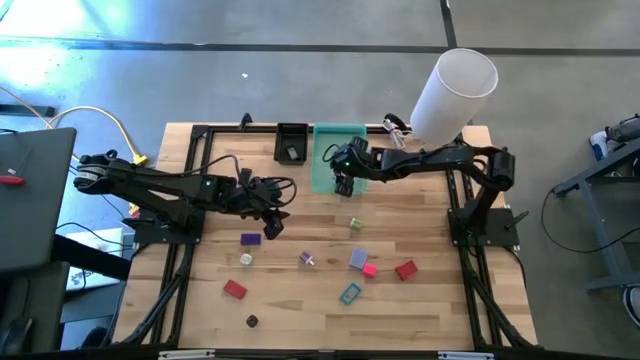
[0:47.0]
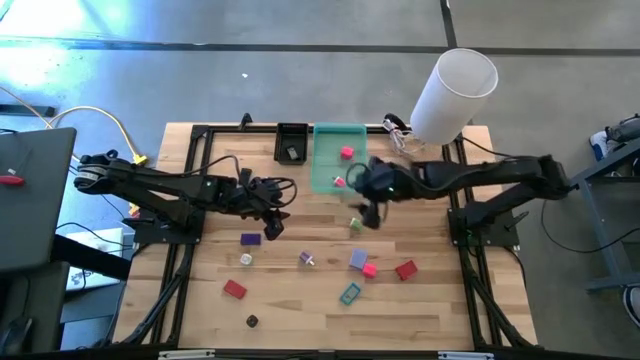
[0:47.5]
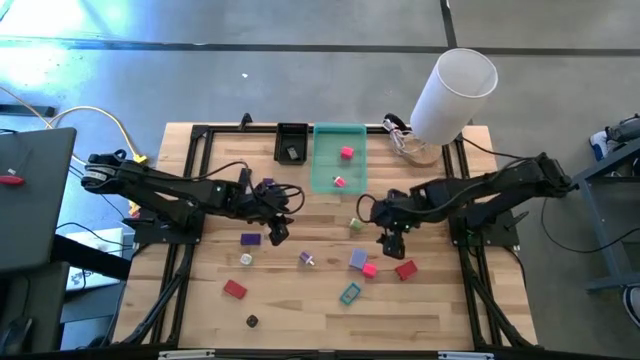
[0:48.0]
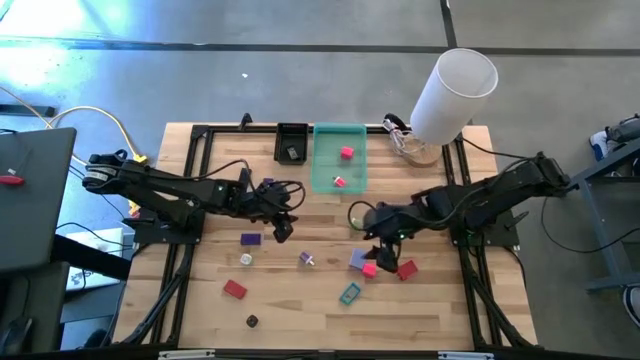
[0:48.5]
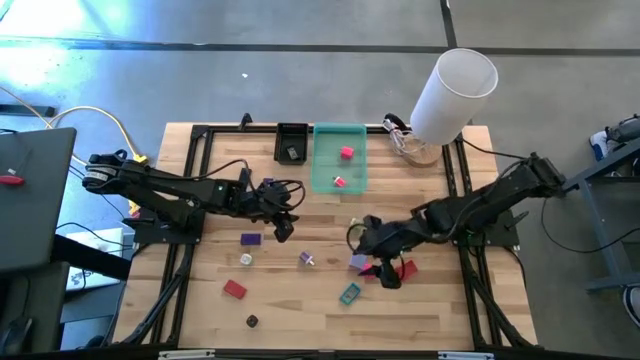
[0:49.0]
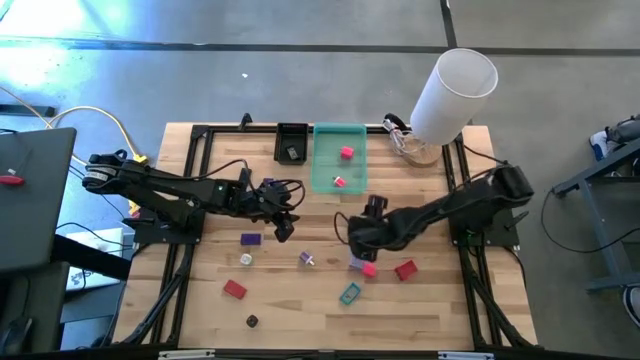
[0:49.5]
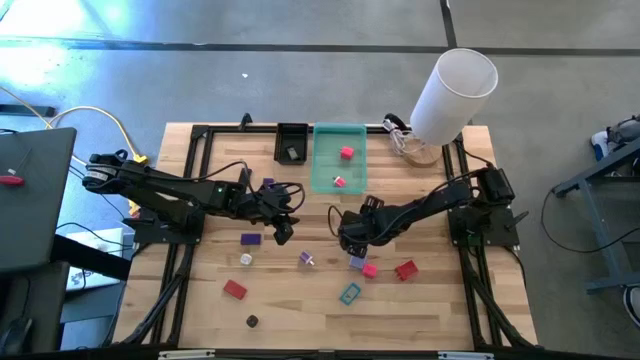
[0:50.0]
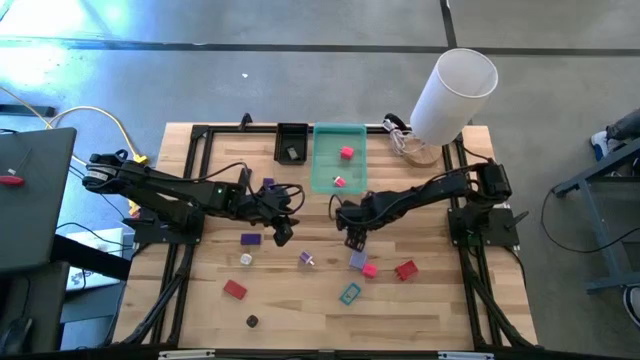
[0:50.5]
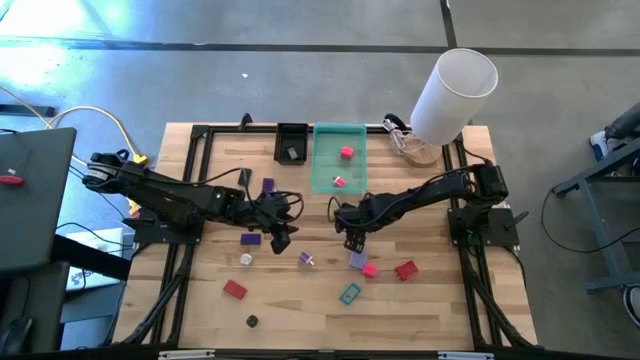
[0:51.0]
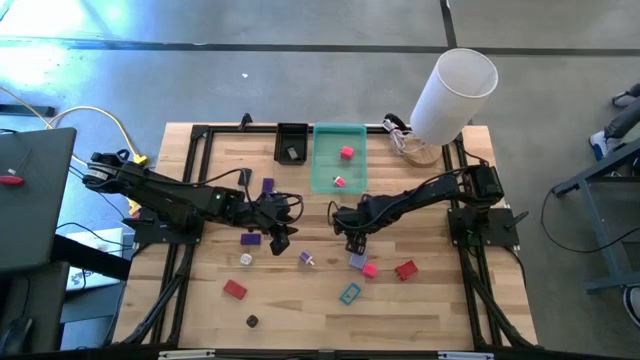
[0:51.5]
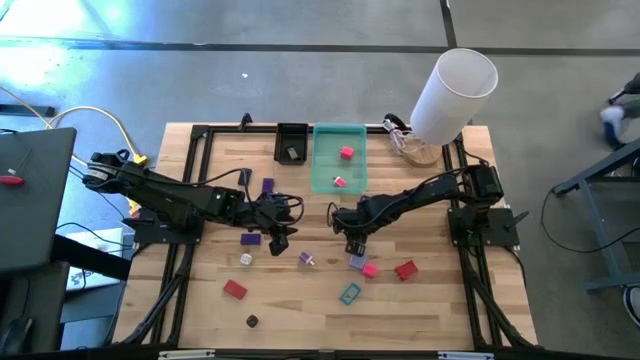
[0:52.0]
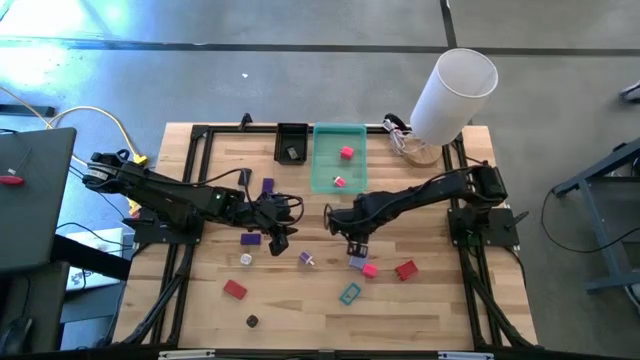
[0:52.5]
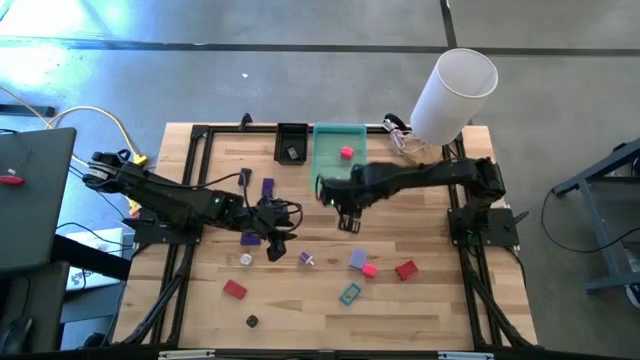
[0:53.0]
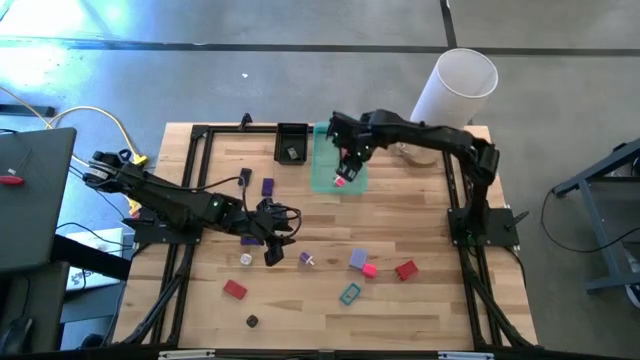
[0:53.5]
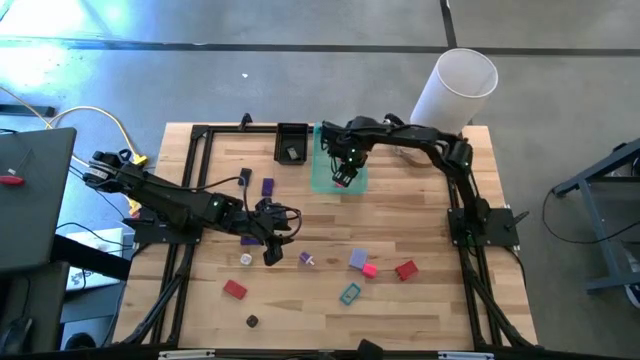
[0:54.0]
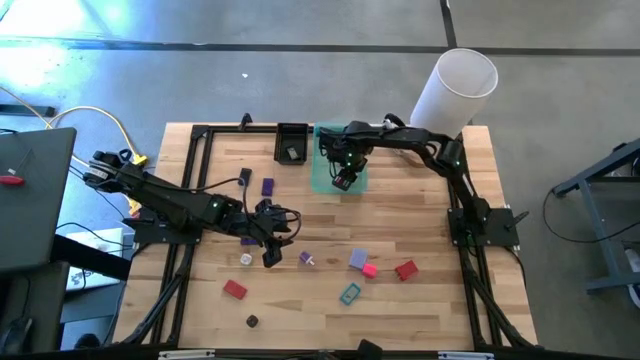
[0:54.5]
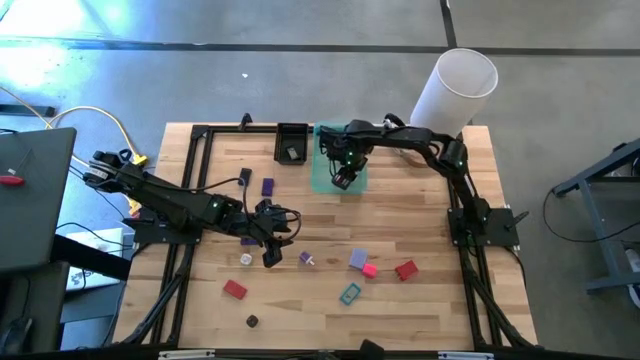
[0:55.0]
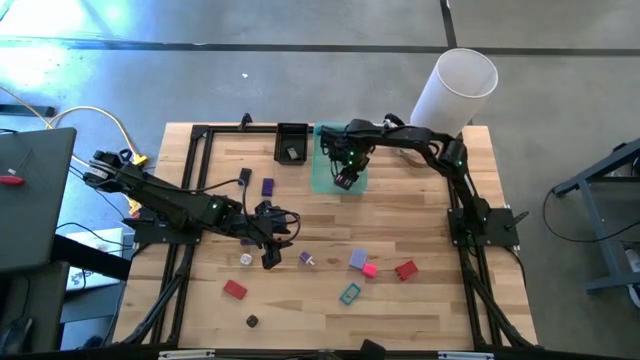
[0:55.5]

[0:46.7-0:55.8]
Task: Pick & Place Office items
Put the right green charger adapter into the green bin

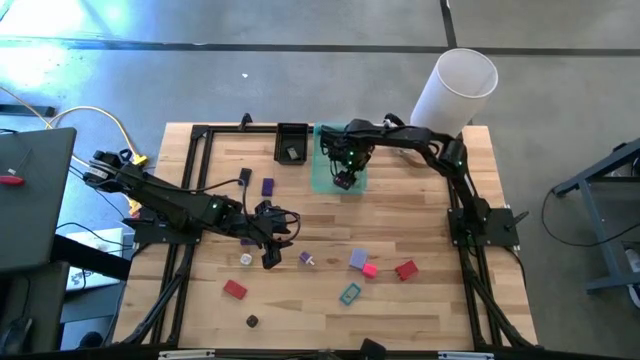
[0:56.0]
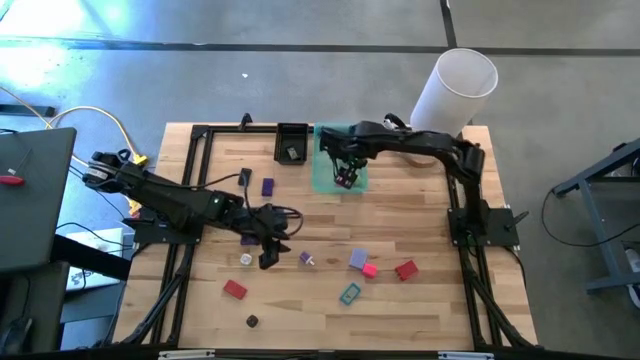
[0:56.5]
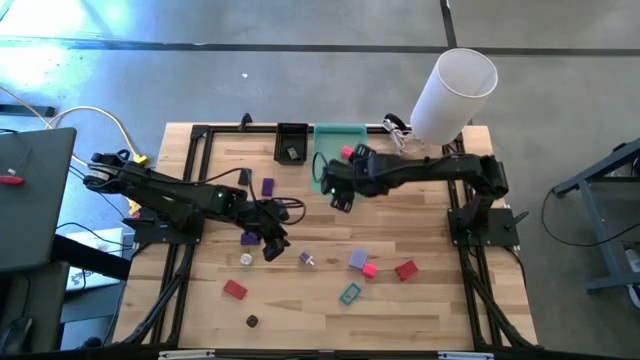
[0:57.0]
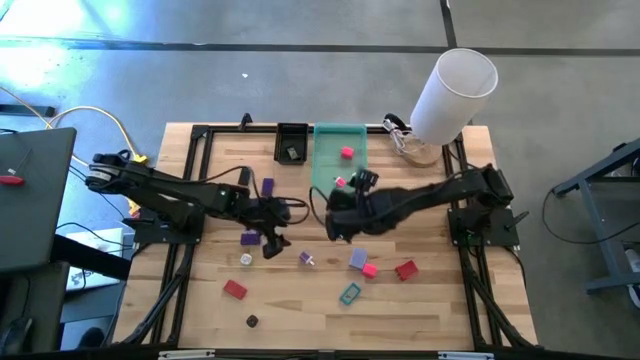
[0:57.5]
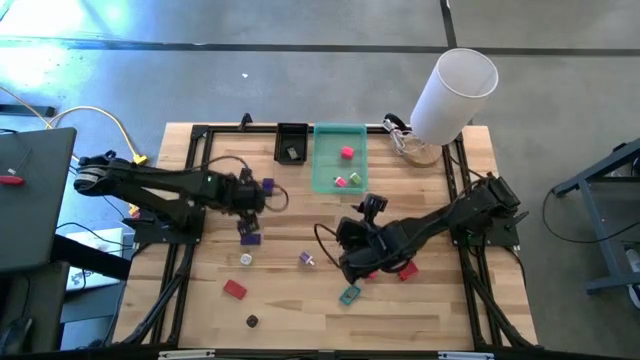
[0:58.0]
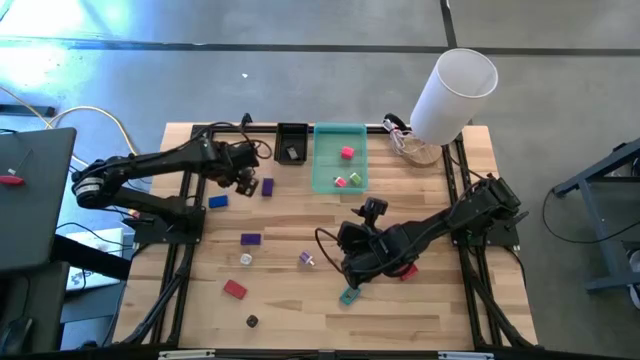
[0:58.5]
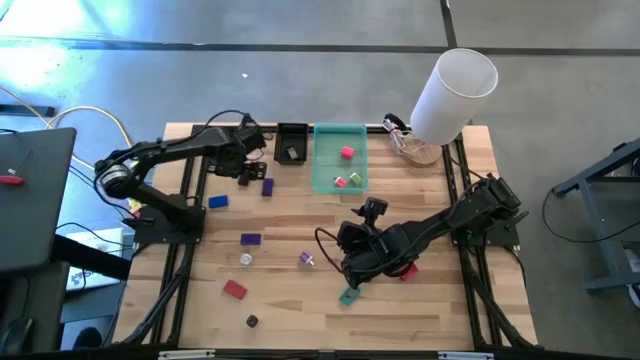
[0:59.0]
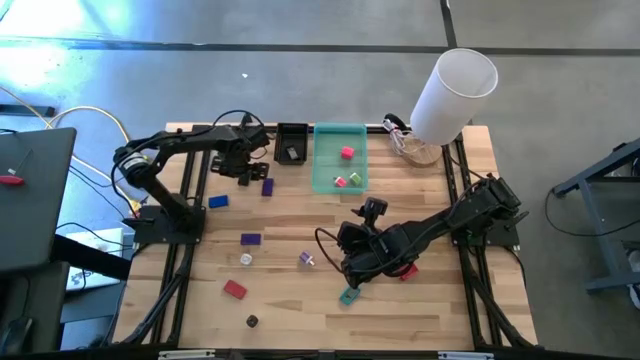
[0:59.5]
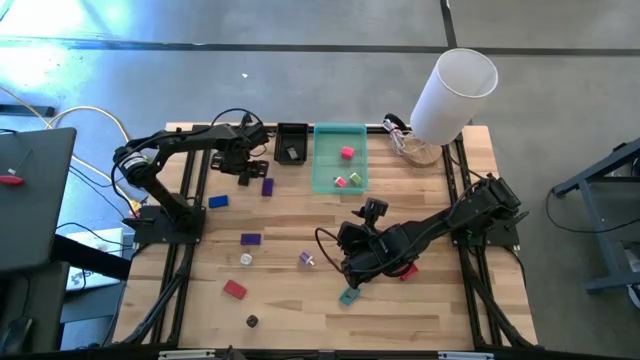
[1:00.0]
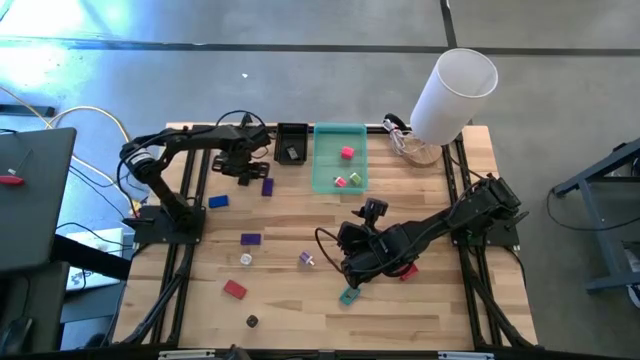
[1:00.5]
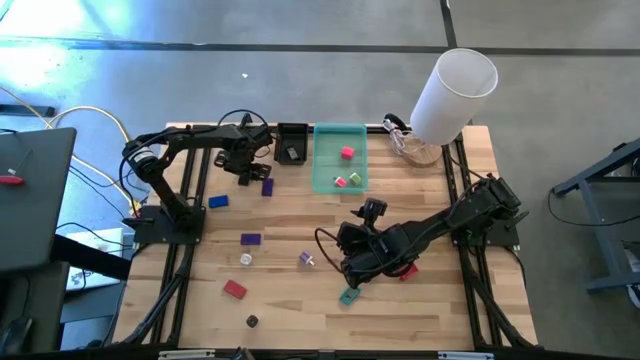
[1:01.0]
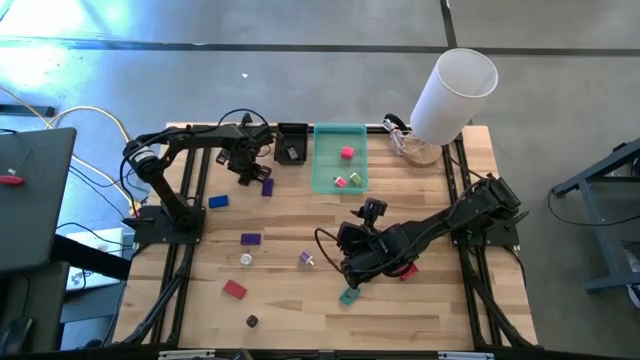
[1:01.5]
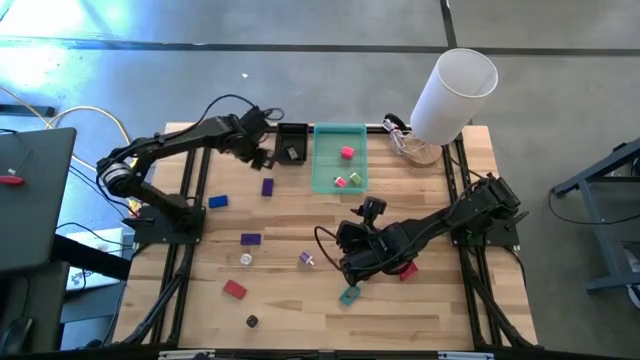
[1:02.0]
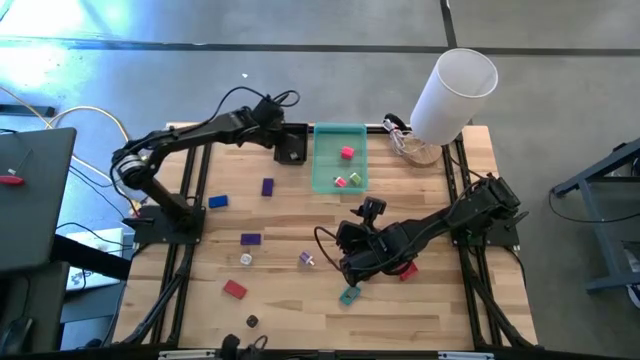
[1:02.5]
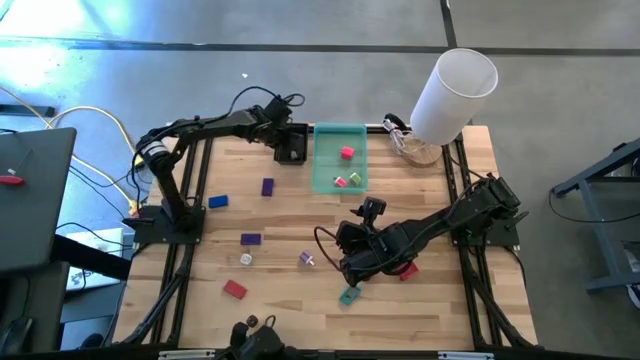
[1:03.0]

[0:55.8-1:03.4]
Put the black digital clock into the black bin

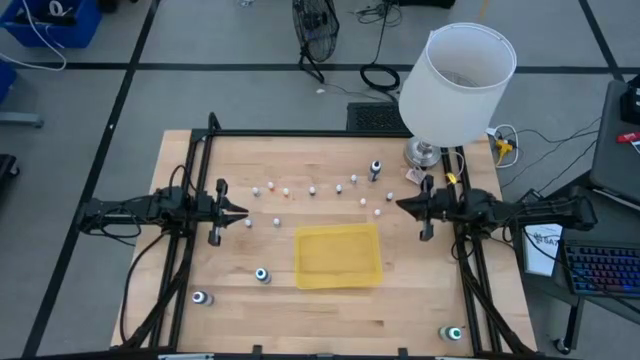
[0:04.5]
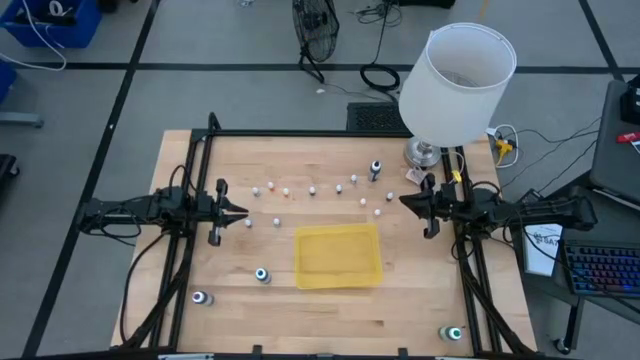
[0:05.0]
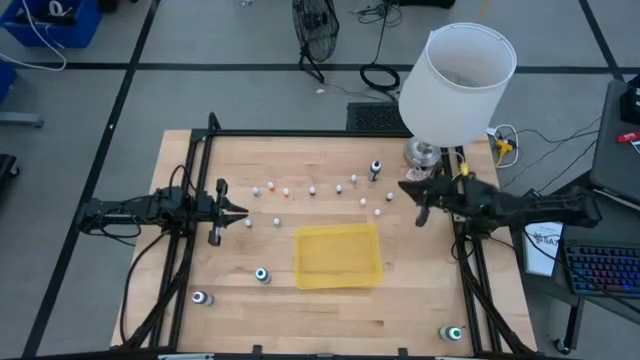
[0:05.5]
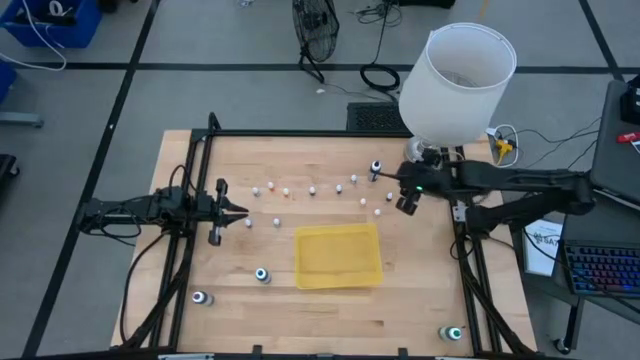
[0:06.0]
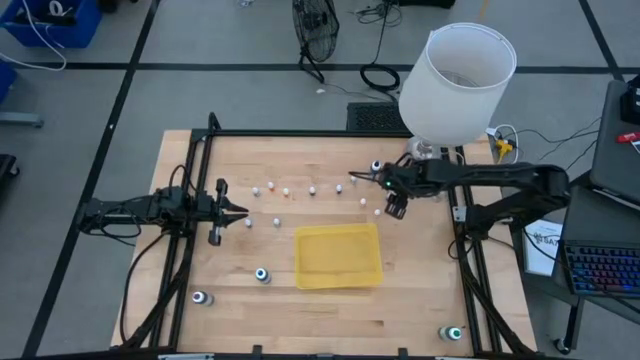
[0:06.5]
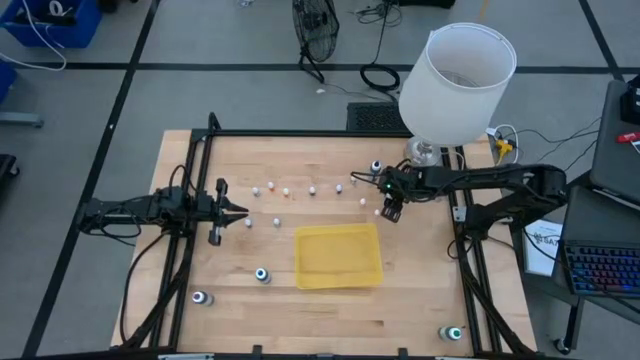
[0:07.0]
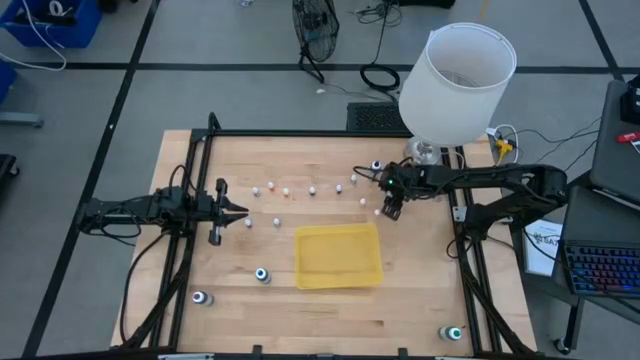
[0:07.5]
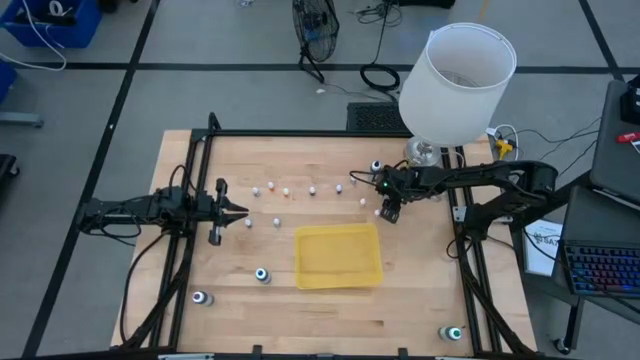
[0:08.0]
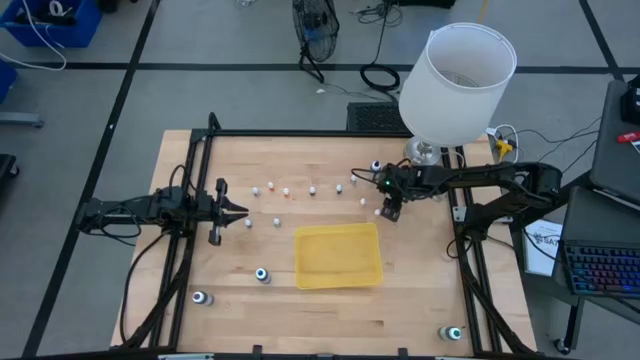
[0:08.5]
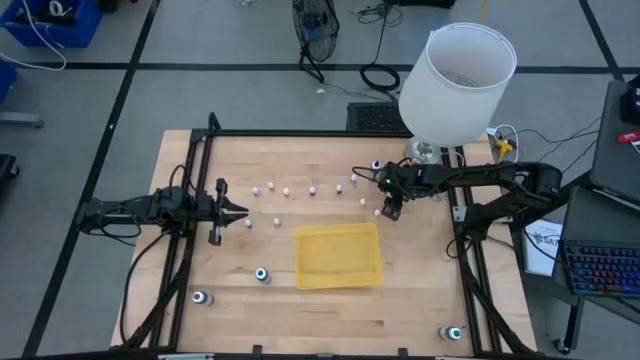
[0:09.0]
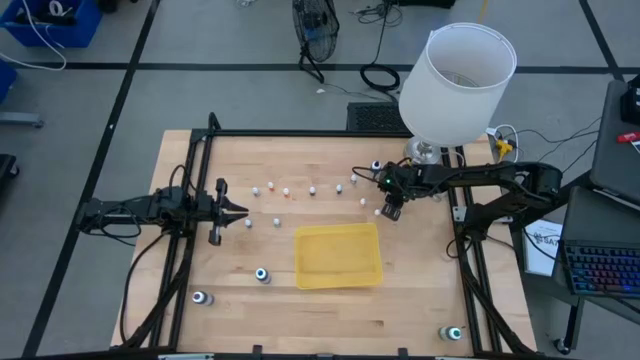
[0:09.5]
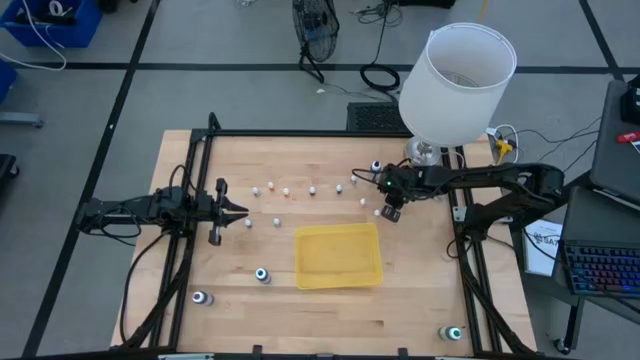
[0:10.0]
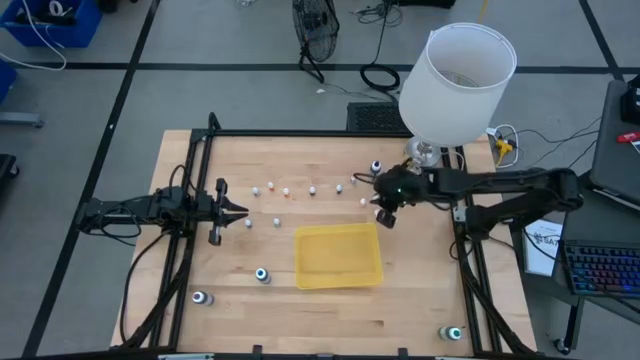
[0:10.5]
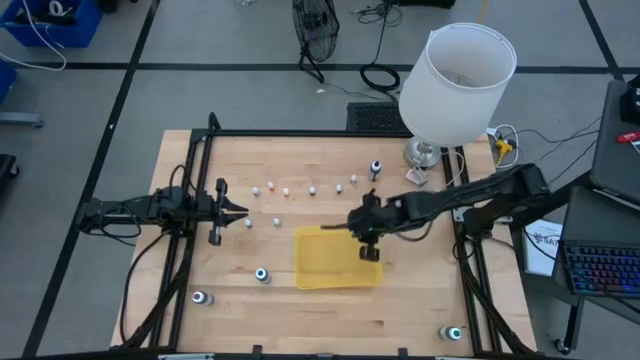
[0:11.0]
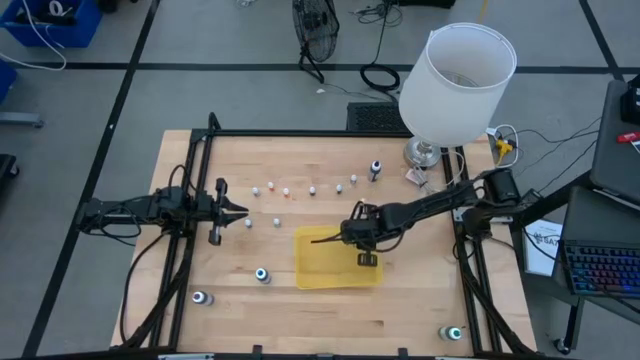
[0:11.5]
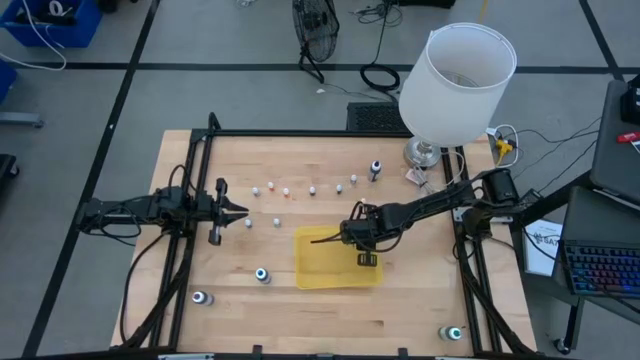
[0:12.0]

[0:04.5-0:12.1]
Task: Pick & Place food coloring
Put the small black food coloring bottle into the yellow bin
